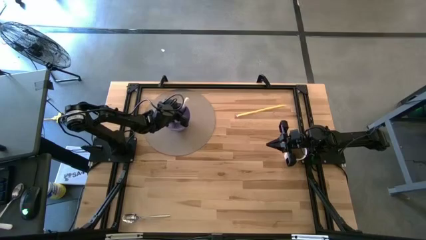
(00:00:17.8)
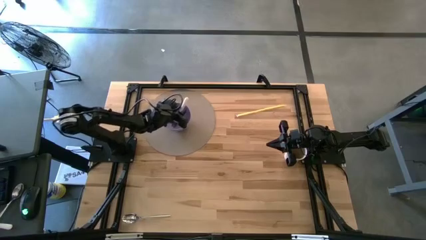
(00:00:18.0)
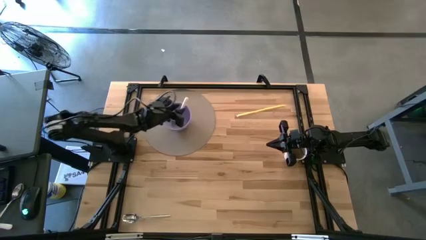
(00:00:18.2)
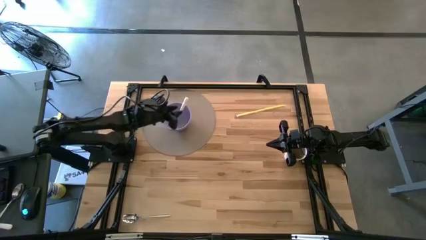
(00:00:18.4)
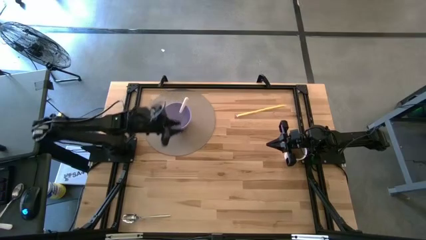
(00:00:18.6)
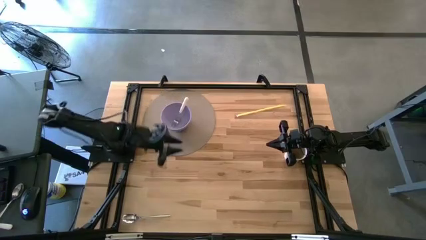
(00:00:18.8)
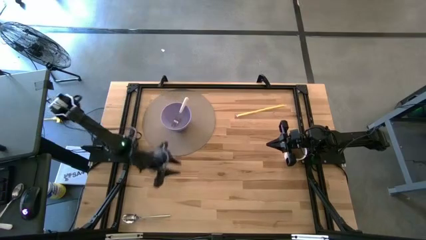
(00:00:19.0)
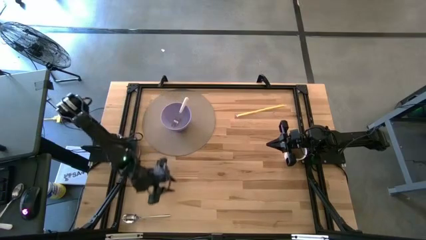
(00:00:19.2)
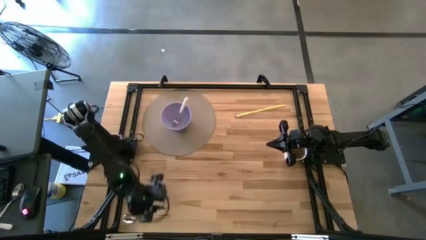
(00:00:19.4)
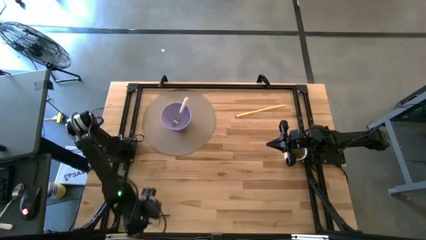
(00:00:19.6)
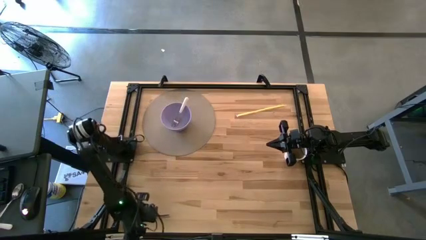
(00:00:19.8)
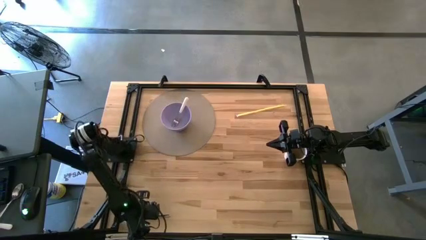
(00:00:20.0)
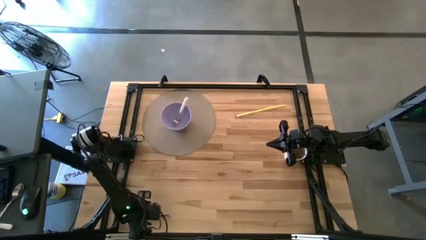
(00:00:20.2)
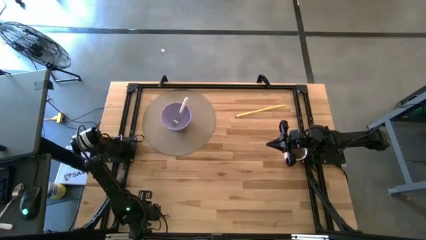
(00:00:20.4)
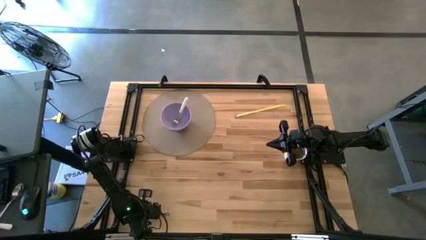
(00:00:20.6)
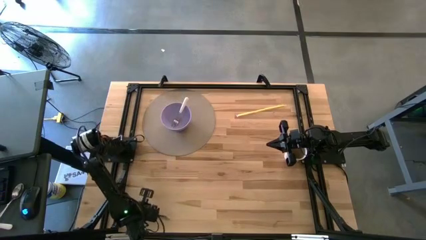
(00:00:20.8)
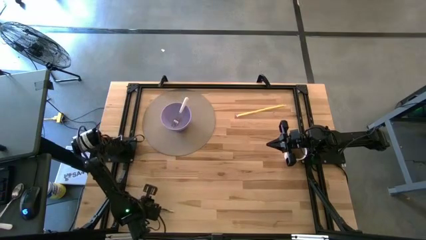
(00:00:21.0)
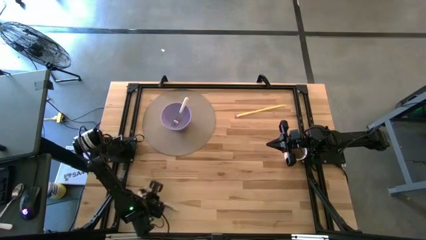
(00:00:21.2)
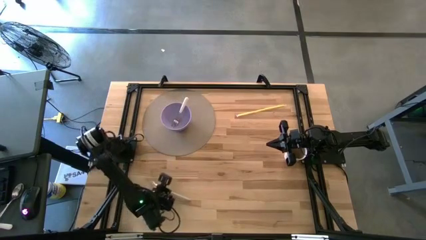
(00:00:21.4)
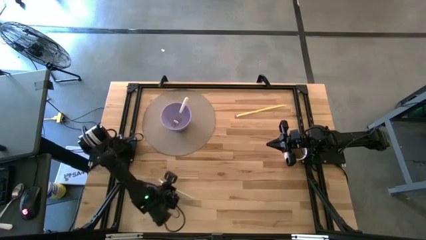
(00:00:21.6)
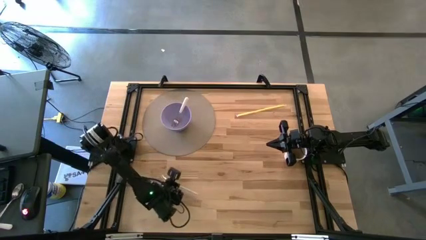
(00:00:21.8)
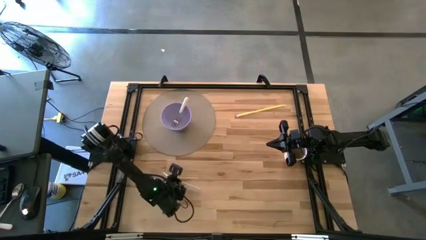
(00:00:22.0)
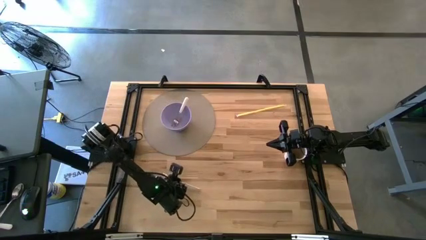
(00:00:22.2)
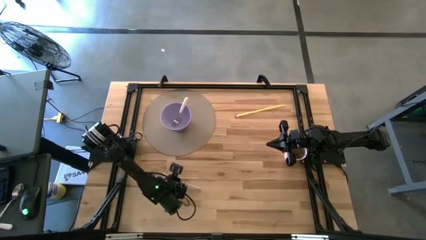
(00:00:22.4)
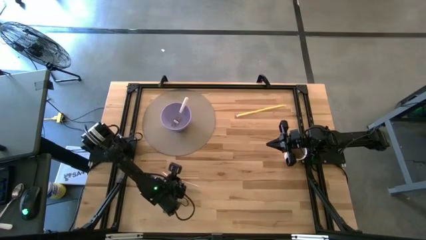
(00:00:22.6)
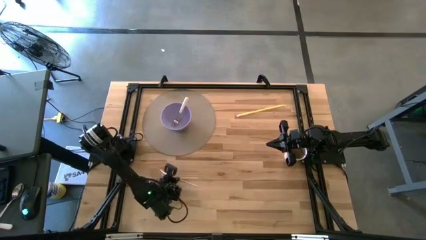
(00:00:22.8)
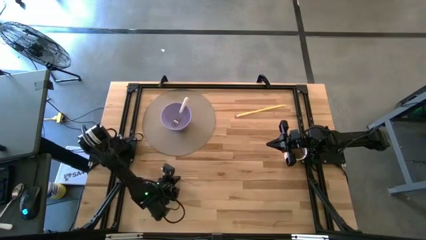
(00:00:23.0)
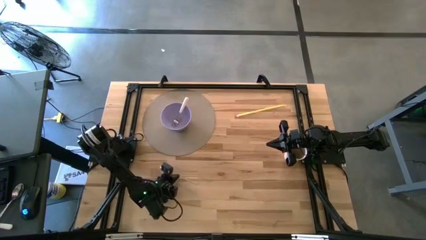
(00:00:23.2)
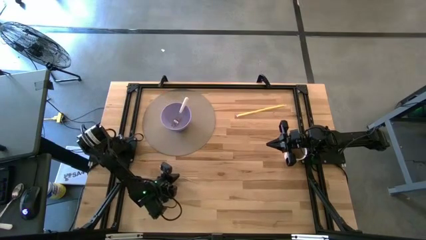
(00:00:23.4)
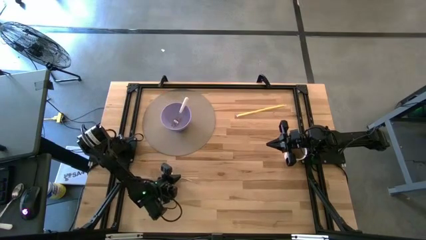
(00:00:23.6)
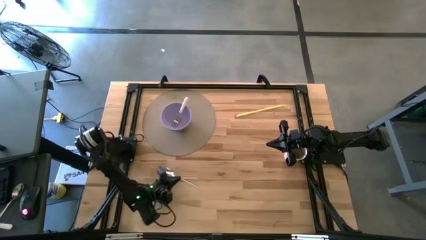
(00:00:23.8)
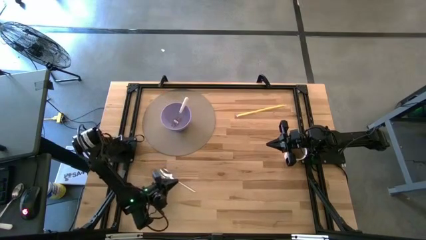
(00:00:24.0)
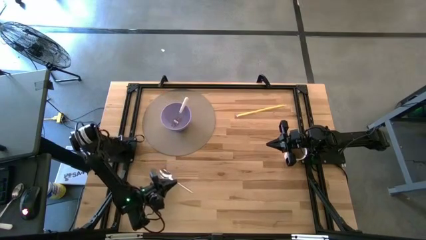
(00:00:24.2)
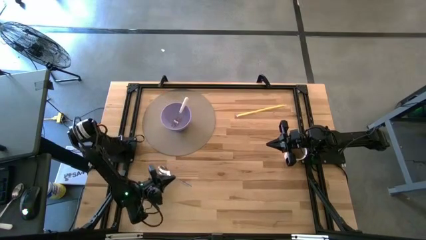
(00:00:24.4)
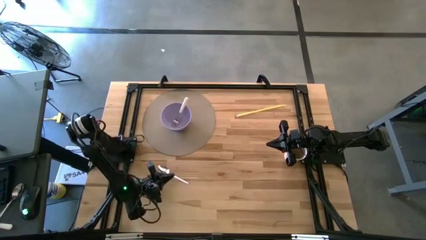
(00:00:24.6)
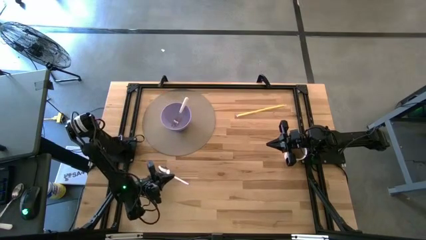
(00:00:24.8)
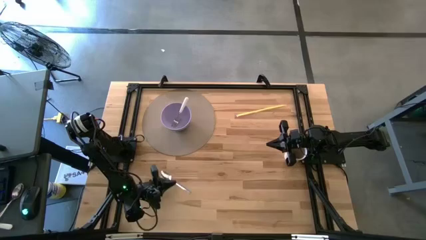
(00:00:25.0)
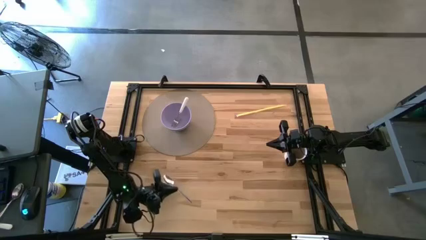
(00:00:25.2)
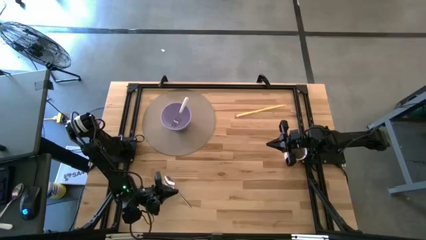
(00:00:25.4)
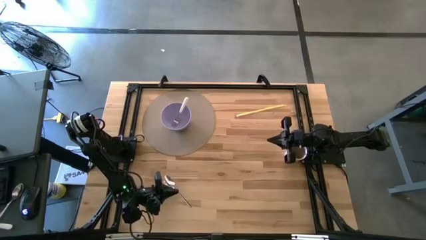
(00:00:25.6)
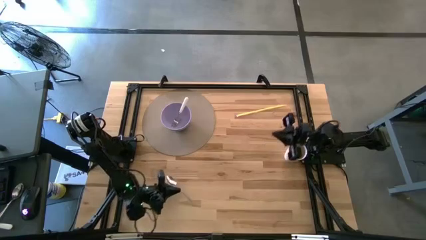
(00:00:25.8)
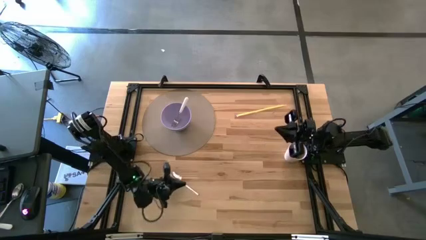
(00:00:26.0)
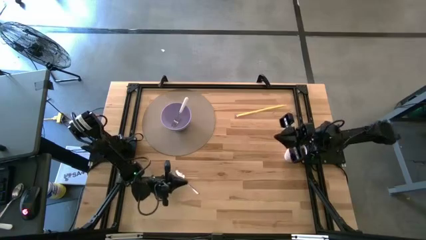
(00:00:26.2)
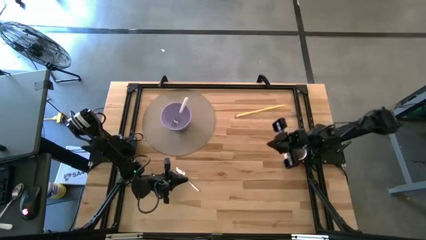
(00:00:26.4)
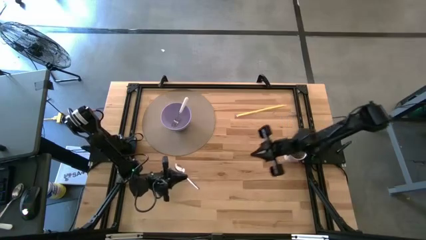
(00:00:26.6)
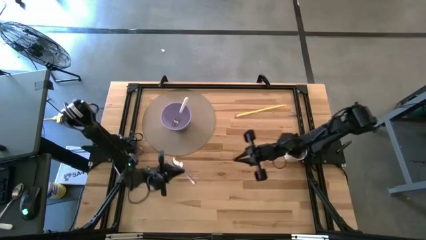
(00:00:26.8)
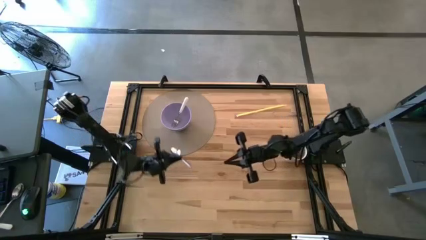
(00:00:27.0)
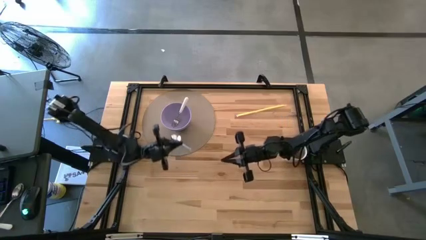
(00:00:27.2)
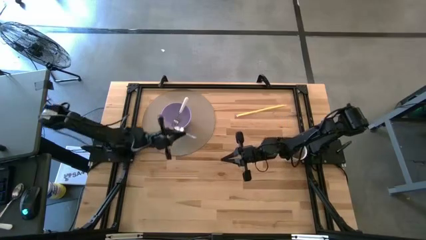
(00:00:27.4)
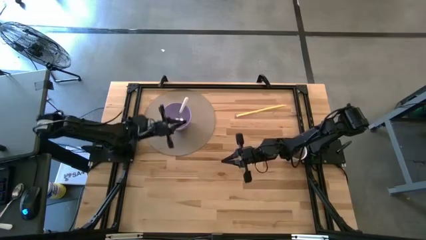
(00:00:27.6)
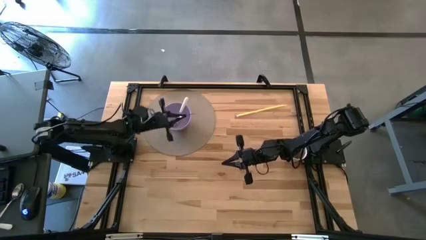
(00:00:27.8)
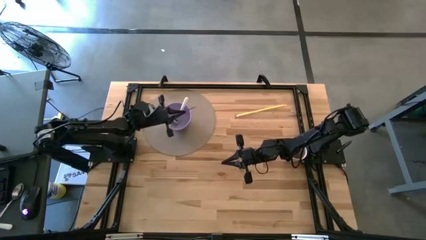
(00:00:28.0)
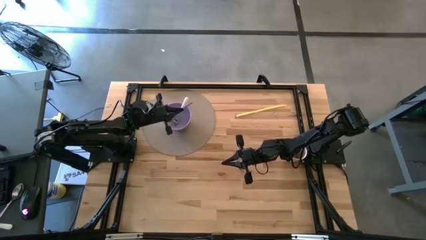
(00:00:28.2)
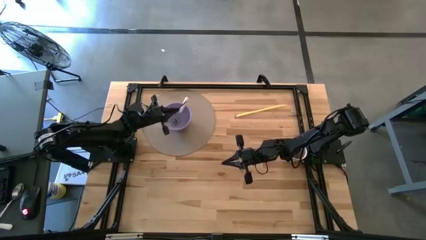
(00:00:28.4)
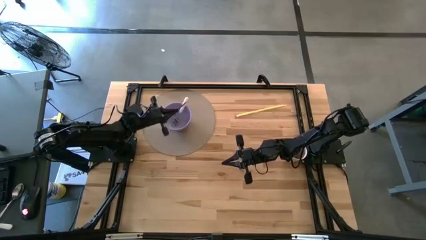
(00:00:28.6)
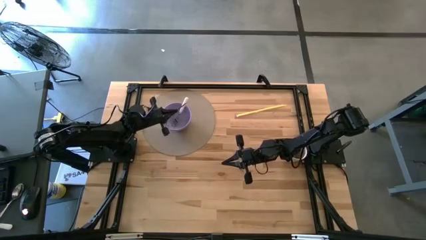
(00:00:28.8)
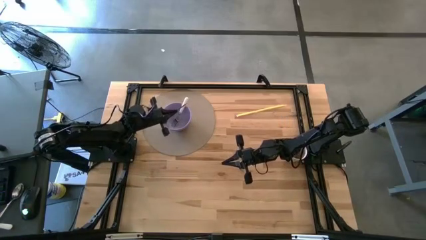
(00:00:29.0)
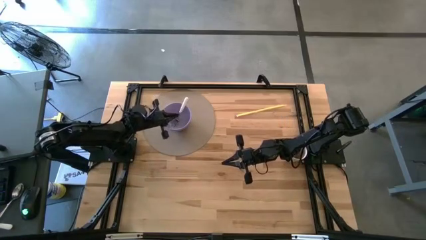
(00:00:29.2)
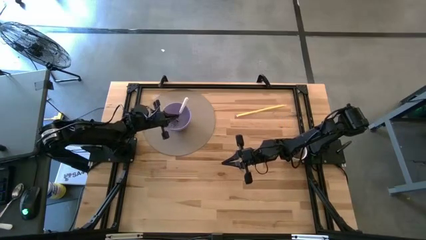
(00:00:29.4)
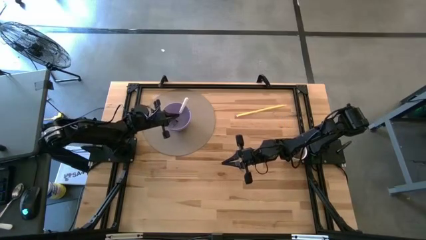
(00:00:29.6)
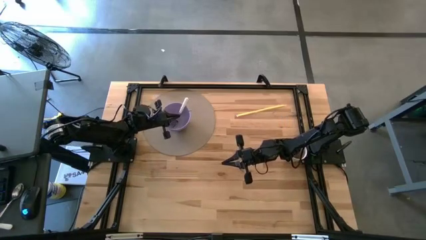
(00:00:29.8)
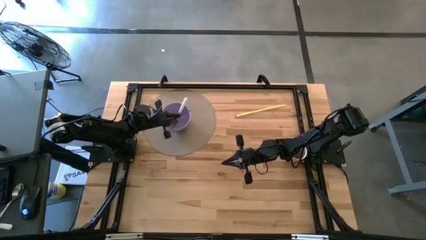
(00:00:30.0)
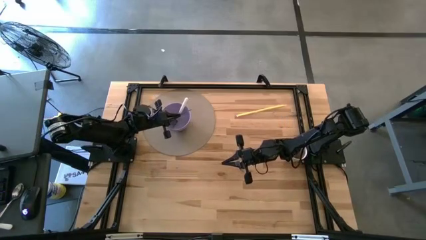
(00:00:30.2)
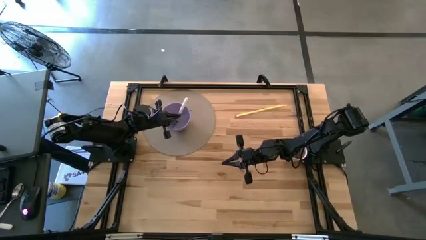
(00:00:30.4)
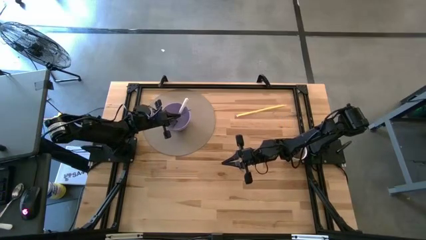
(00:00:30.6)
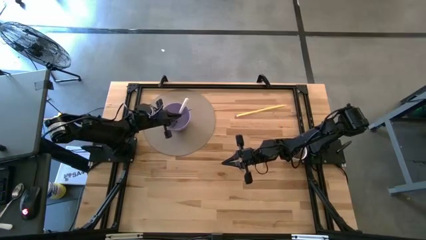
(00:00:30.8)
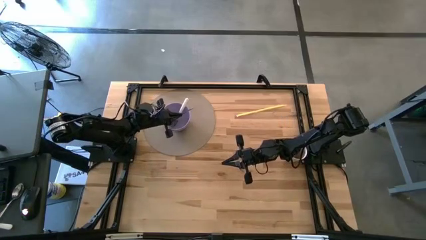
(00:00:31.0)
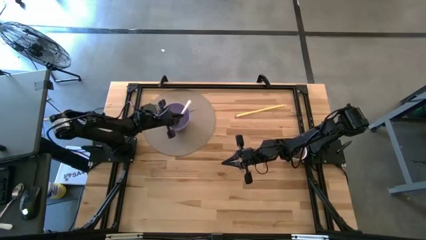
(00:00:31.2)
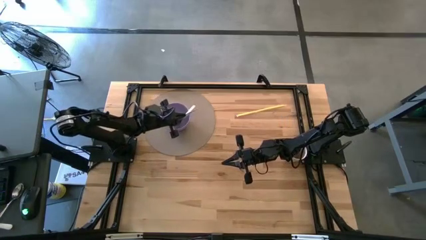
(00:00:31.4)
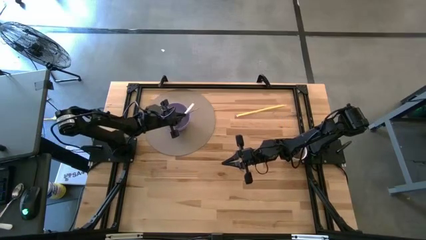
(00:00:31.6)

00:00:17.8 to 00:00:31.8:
Task: Pick & Place Utensil
Put the silver spoon into the violet bowl on the brown mat
